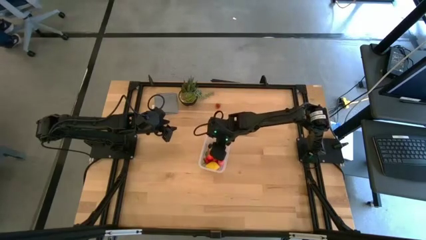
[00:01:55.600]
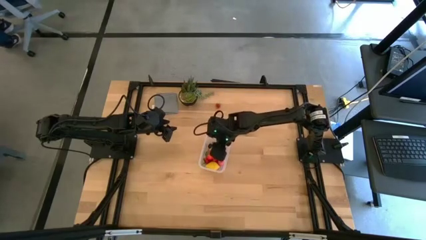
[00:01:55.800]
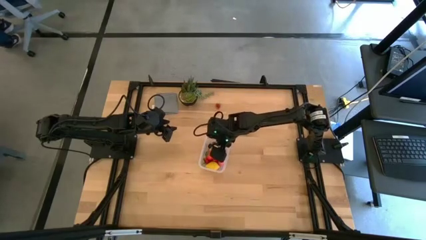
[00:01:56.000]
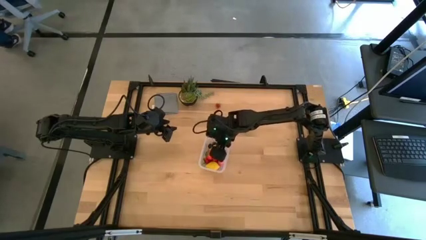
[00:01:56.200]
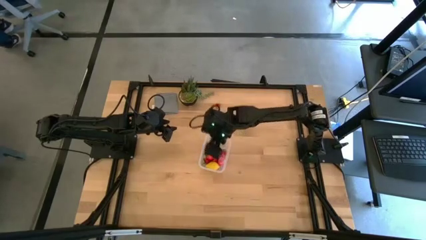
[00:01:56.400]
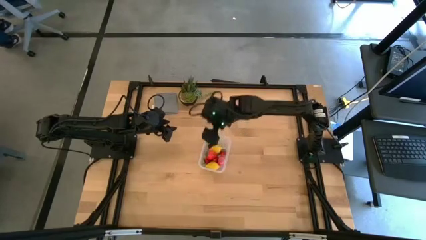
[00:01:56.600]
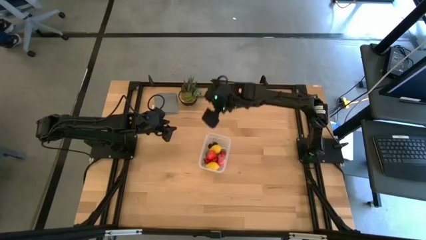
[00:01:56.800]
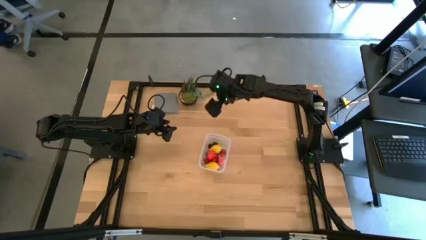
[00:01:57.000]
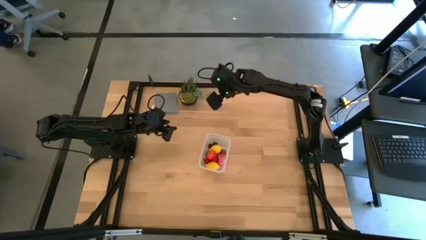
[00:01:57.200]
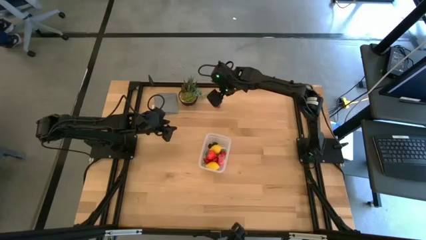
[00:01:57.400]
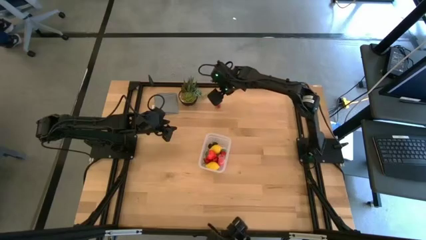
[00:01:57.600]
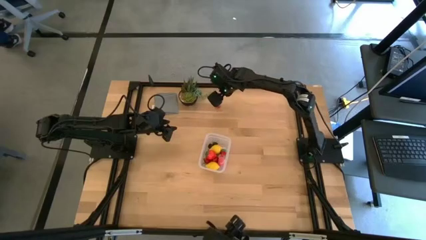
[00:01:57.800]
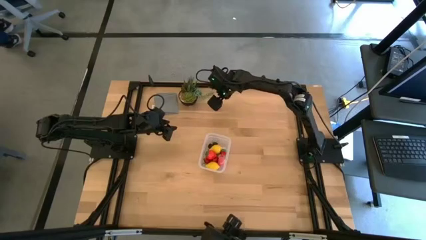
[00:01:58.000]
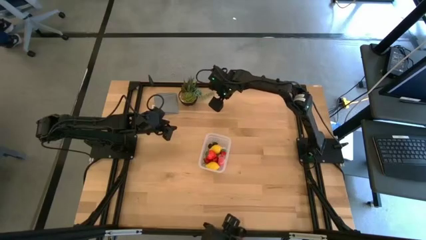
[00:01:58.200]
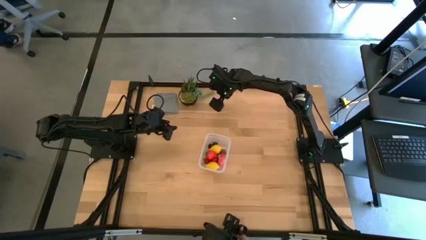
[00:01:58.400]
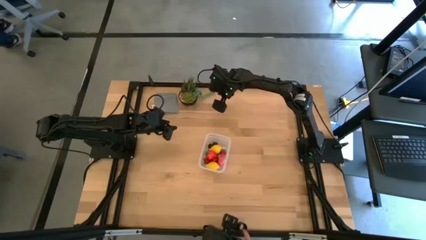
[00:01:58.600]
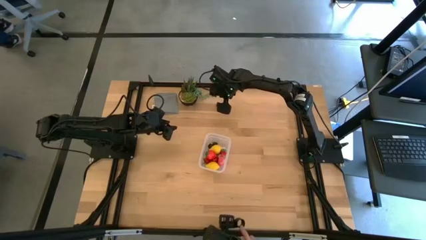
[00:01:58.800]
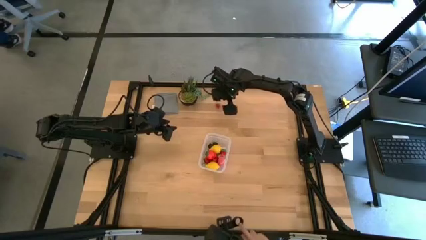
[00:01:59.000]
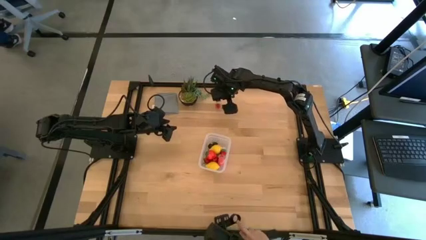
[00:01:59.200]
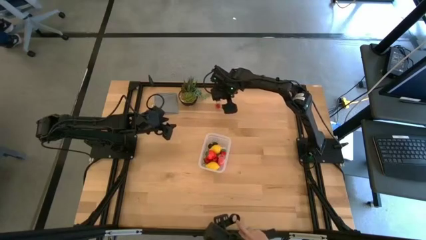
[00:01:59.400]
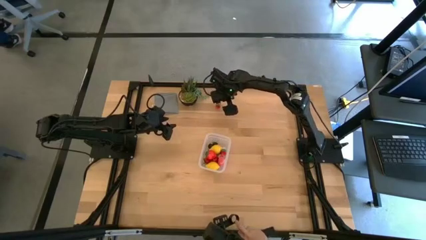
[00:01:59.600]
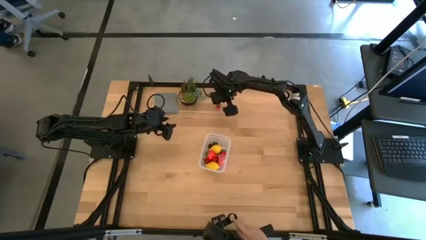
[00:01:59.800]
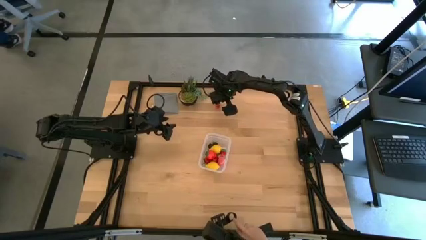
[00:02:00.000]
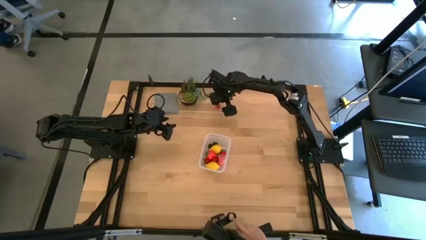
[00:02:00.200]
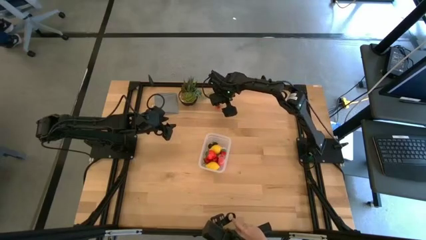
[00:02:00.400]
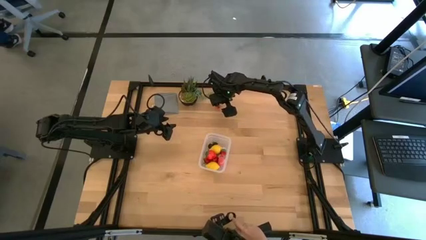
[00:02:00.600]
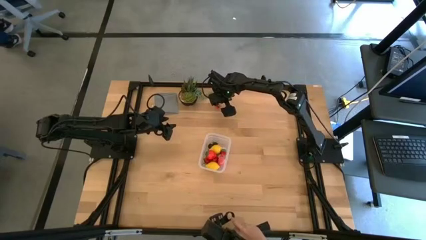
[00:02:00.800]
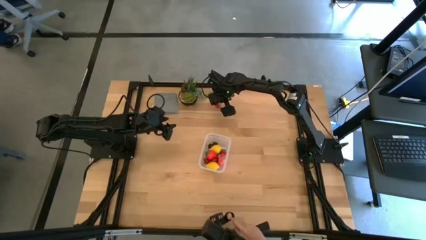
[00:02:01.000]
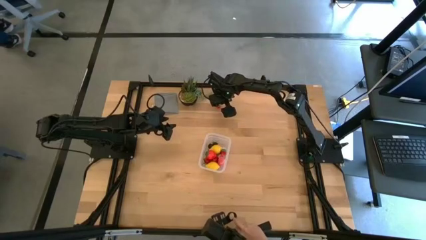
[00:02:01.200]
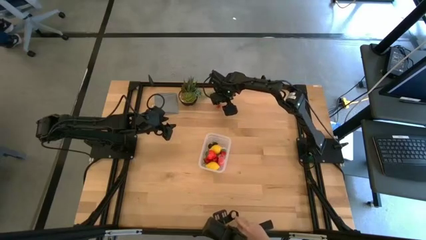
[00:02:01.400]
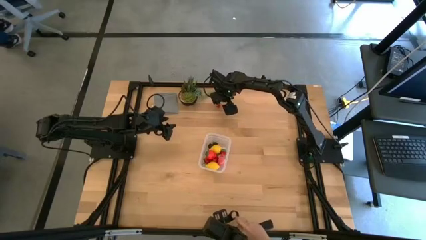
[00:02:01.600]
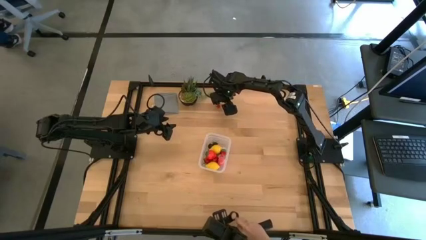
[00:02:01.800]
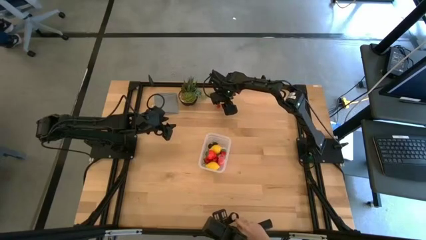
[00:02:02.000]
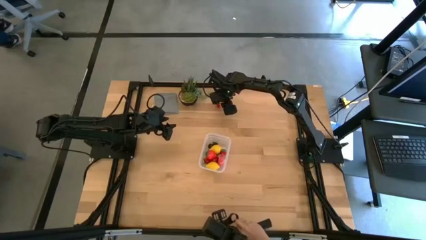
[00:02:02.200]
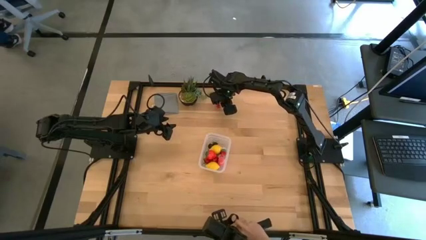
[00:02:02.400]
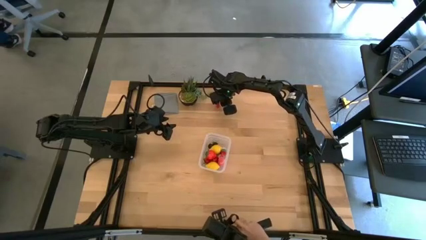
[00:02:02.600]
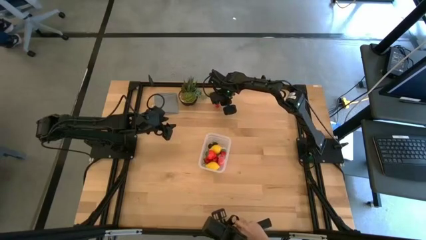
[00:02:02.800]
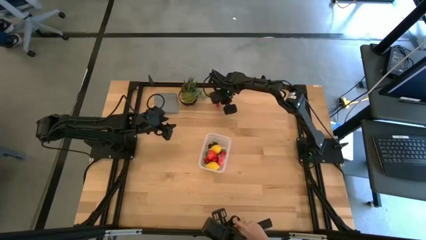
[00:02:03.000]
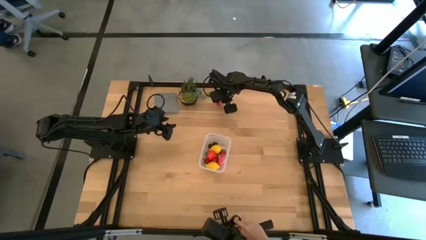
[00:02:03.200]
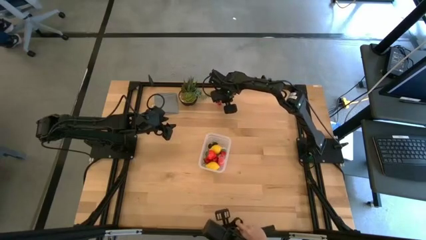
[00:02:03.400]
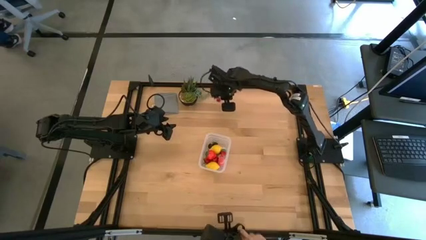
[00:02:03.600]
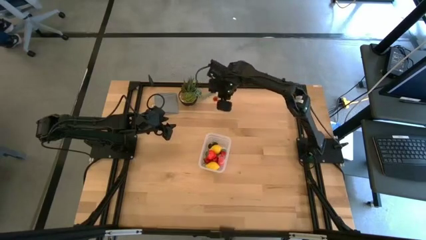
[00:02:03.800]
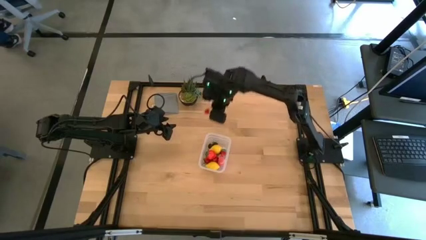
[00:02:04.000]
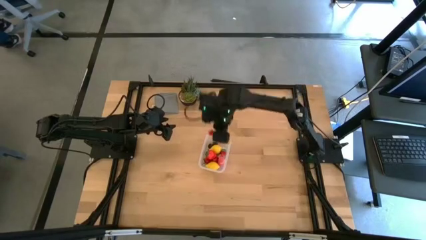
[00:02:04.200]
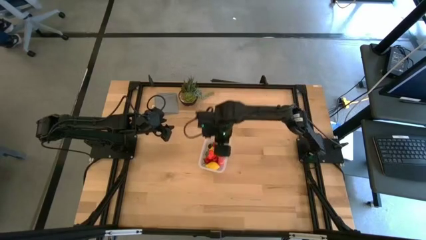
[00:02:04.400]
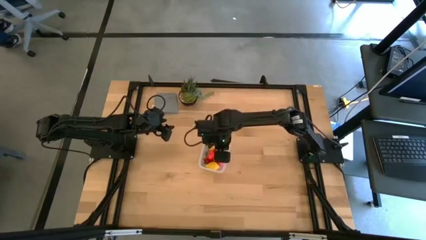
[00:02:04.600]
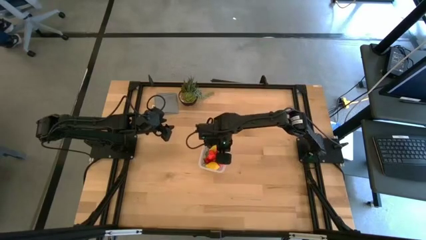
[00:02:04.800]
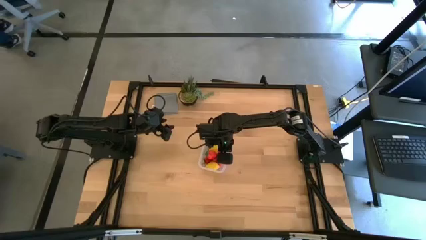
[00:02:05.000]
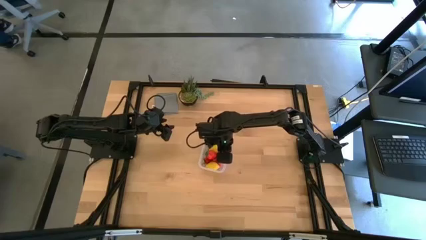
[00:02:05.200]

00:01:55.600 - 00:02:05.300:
Task: Pick and placing Produce into tupperware
Put the red strawberry into the transparent bin

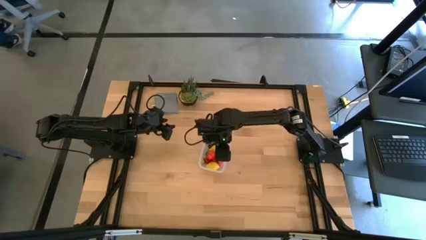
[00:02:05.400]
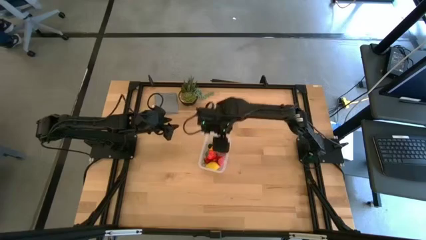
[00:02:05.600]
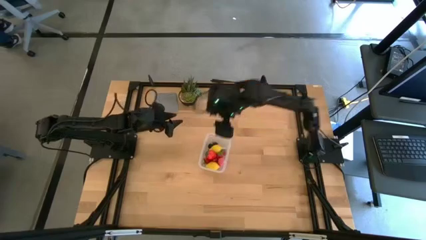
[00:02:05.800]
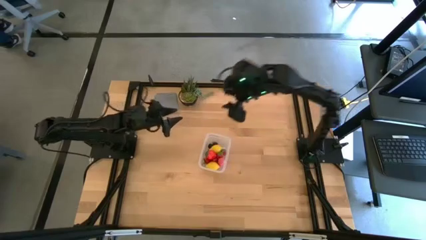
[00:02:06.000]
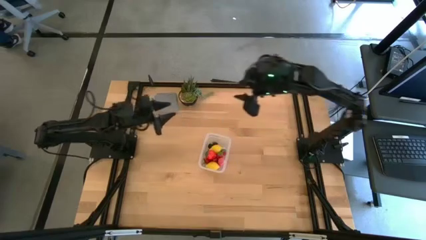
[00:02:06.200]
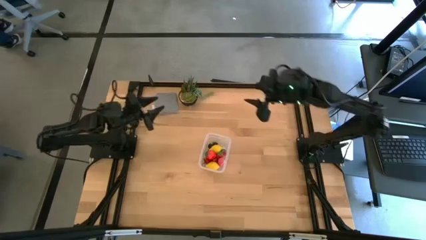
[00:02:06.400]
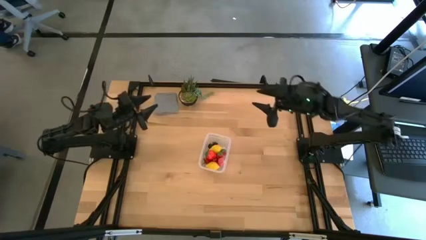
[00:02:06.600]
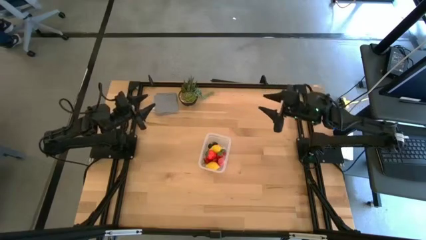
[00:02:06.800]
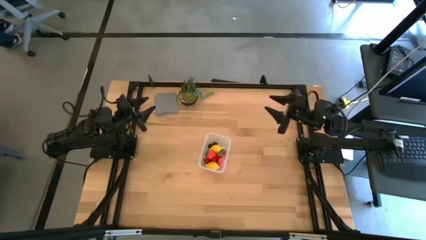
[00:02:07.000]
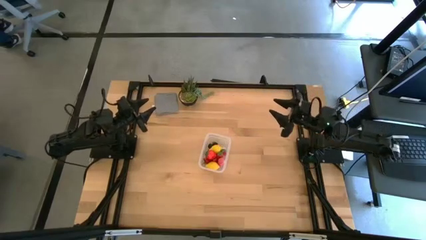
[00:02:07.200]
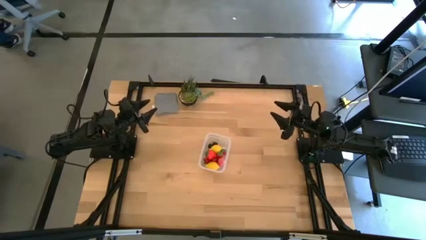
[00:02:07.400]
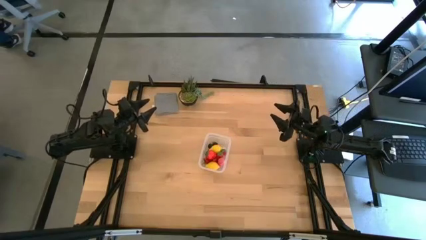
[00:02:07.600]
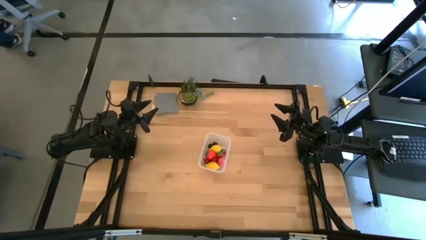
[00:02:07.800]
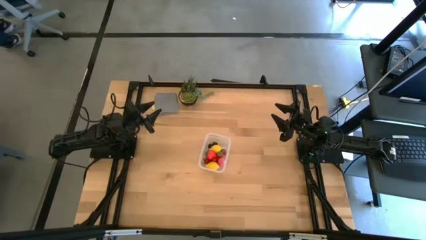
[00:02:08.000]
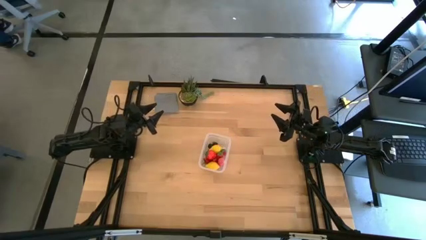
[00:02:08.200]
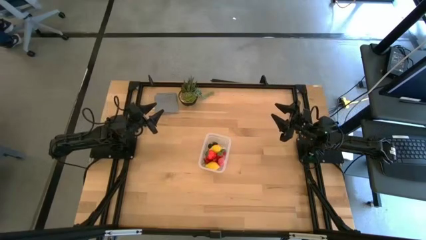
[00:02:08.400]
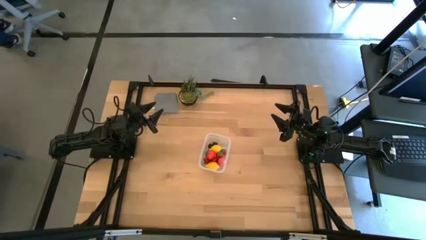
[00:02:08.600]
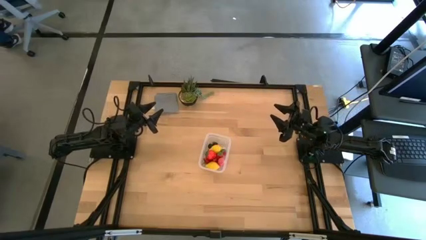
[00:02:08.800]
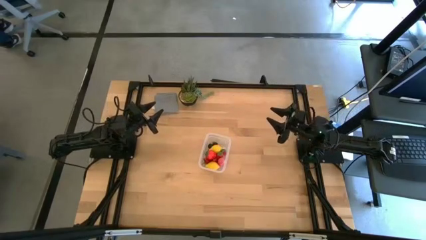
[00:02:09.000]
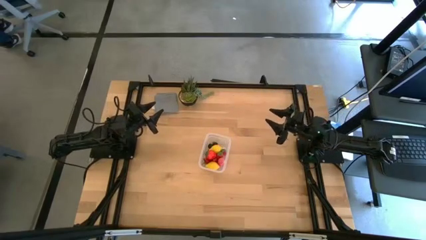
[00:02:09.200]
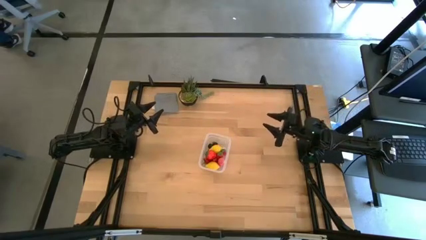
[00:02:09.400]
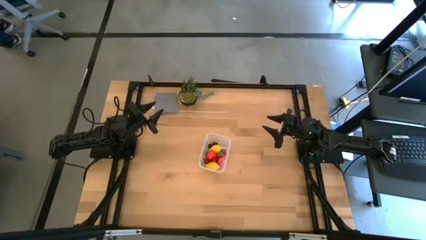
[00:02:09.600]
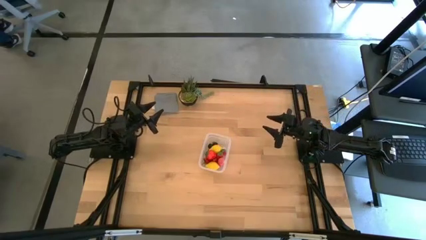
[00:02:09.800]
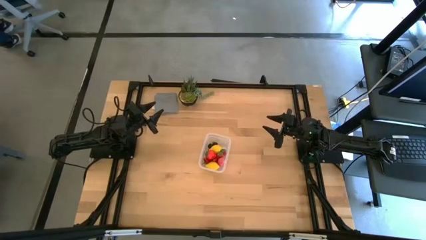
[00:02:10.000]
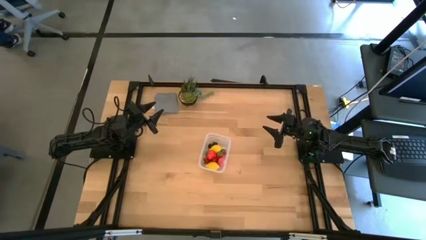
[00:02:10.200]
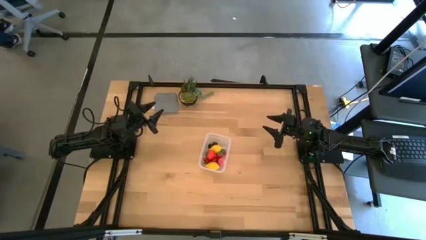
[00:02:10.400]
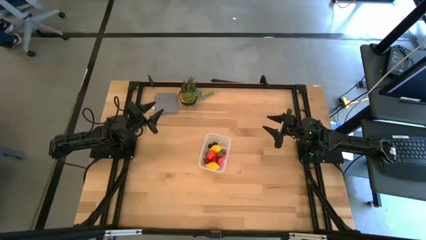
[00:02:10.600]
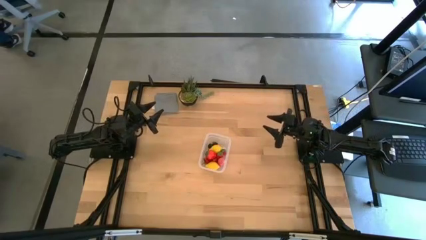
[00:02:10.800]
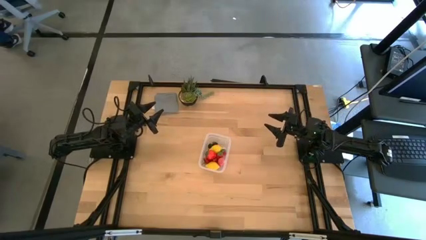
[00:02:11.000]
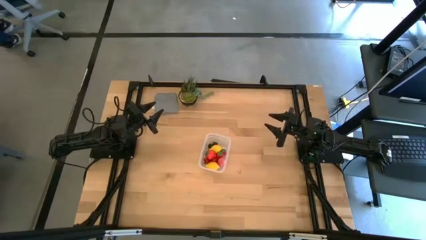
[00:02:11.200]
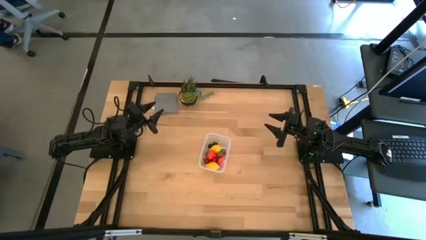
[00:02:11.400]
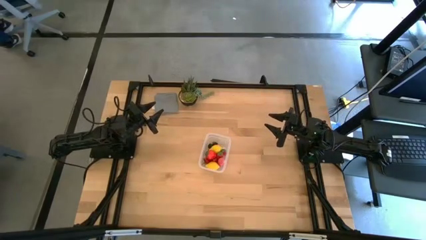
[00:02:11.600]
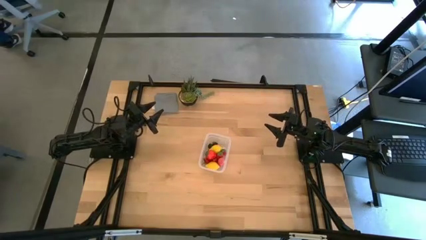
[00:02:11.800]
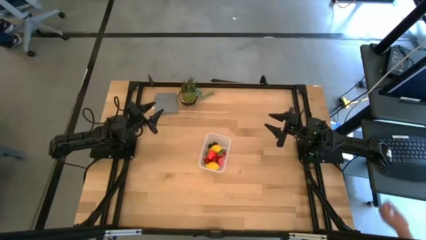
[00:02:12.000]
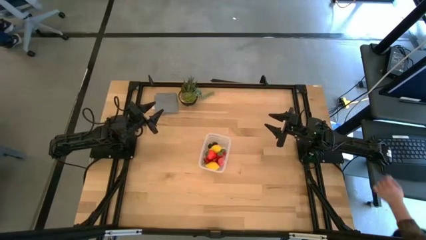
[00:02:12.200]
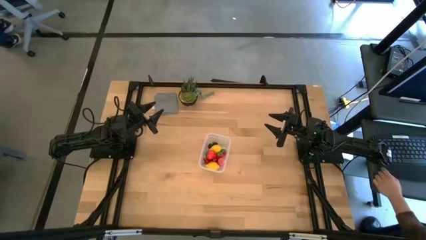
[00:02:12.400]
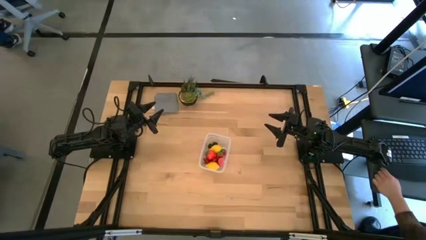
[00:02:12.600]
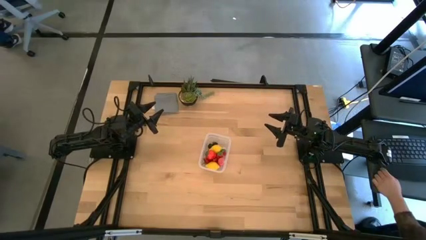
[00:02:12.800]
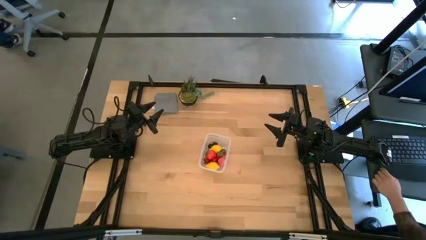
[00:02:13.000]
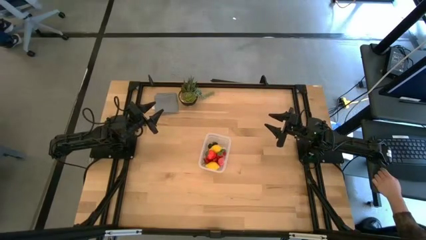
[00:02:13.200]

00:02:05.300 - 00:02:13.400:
Return to Home Position
